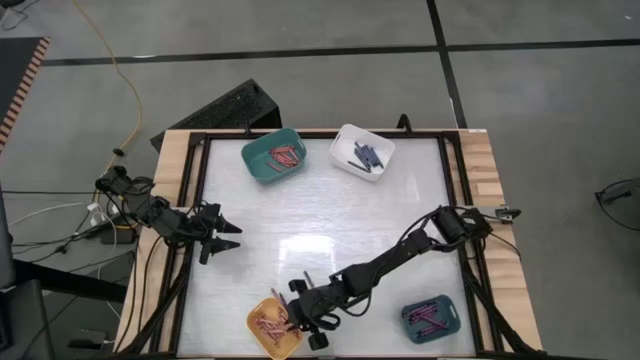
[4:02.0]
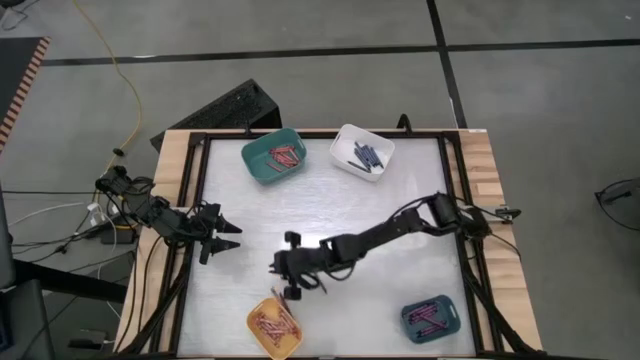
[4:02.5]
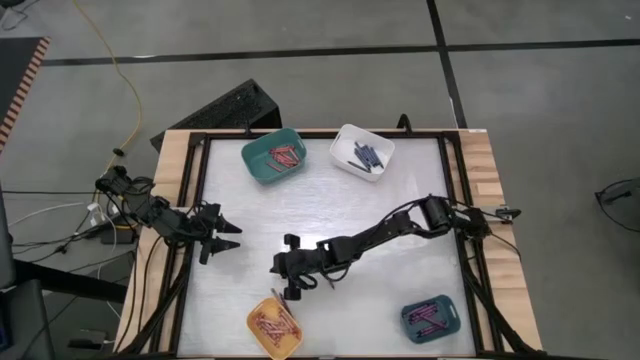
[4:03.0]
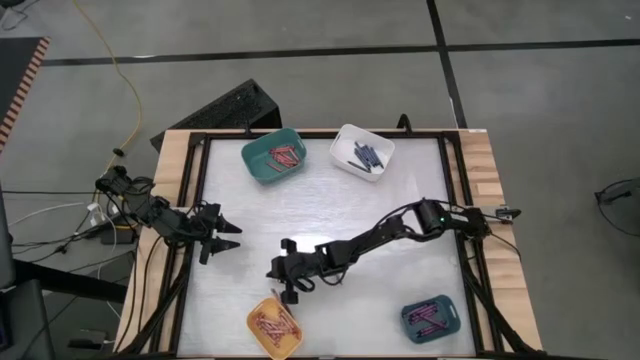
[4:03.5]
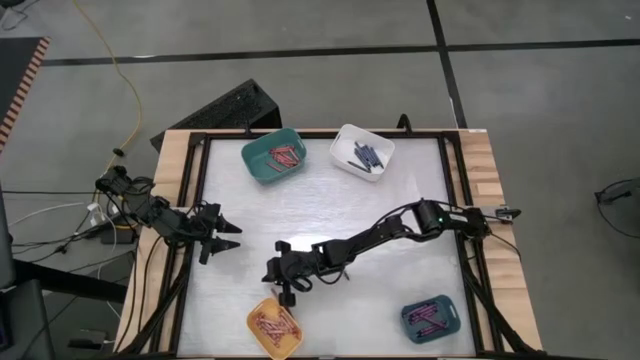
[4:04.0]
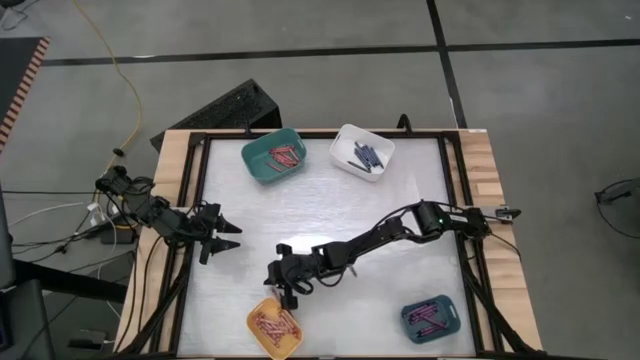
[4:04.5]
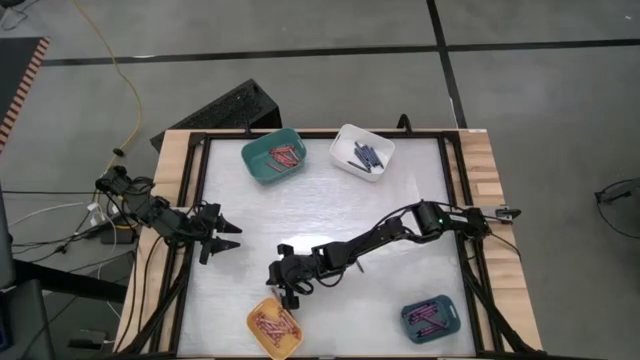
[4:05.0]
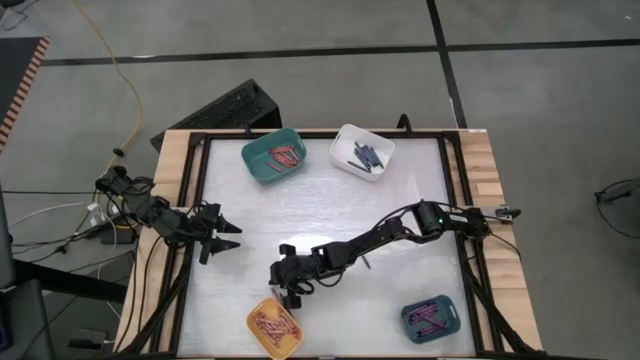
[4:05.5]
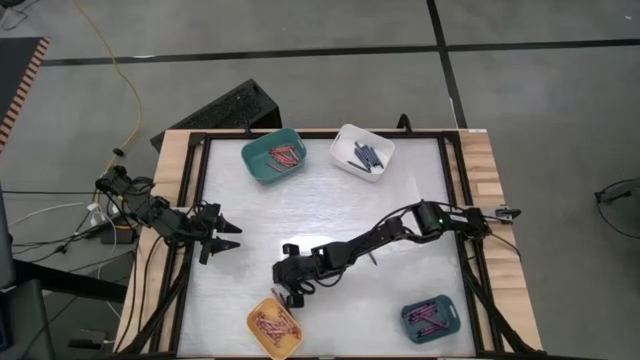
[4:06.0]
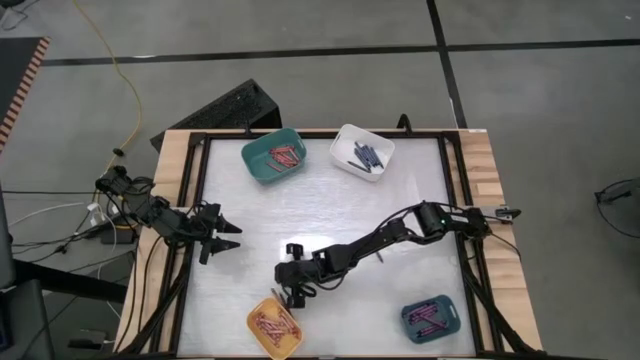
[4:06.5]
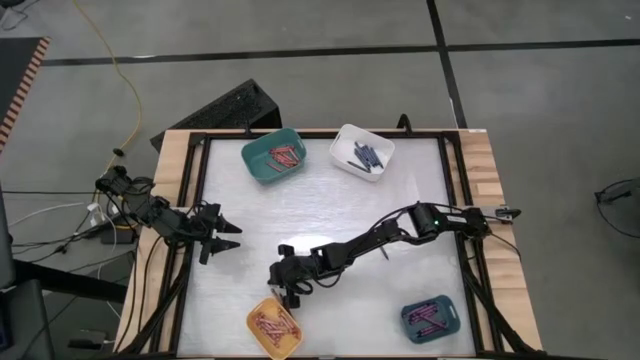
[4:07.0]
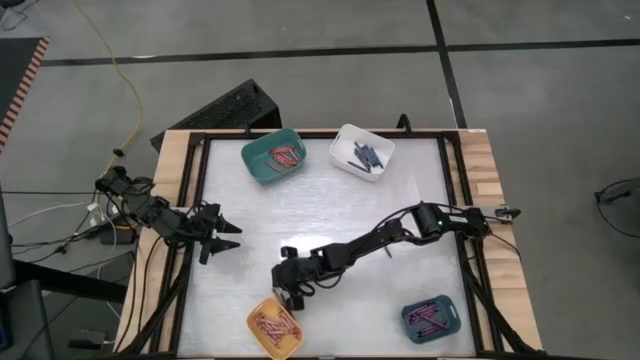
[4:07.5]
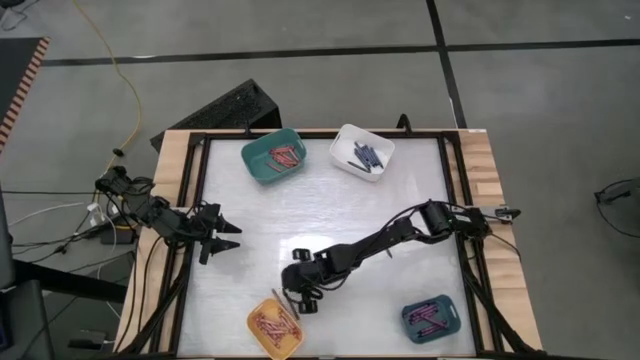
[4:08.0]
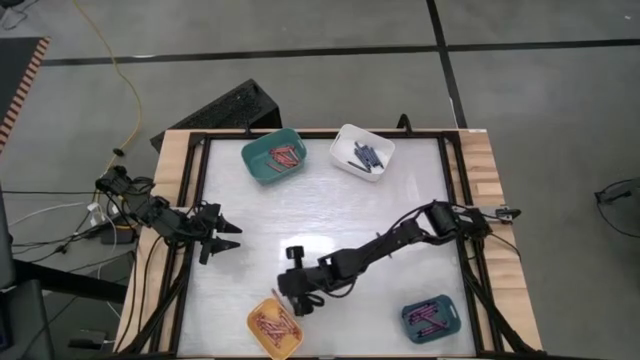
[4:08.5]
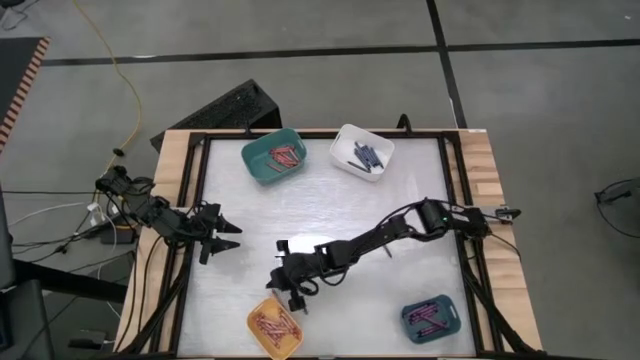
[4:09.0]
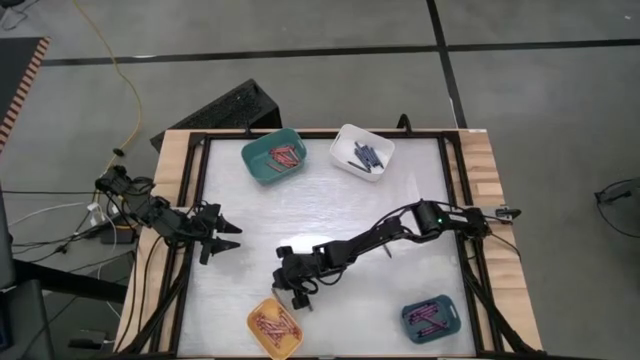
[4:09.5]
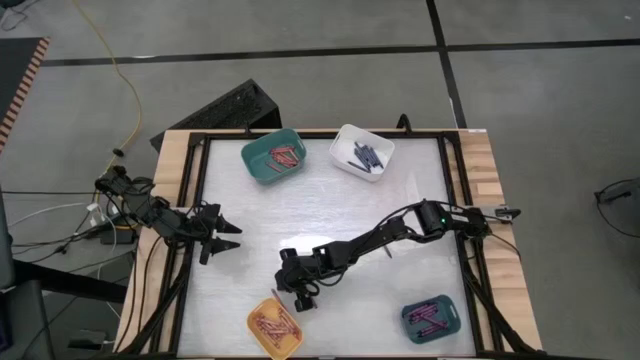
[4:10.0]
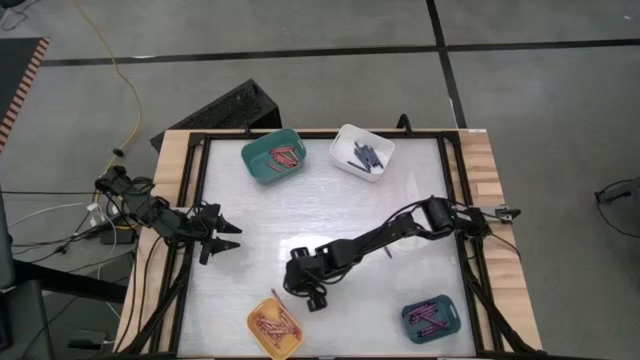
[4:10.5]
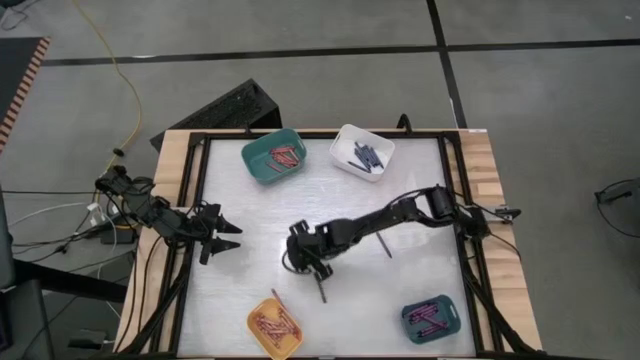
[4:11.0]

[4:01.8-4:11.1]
Task: Sort crayons
Adjust the crayons

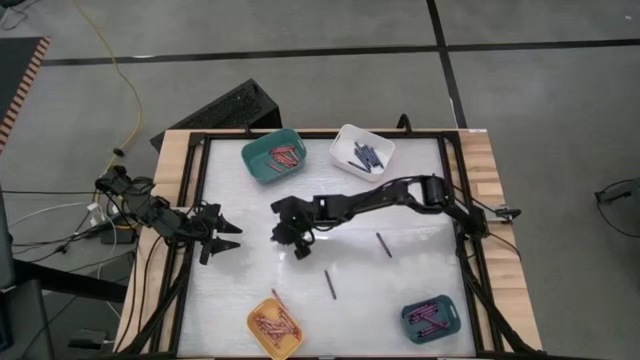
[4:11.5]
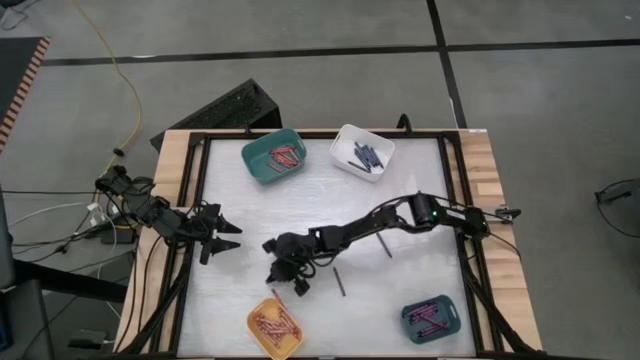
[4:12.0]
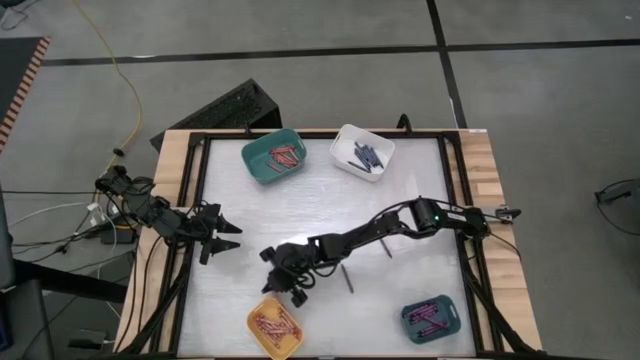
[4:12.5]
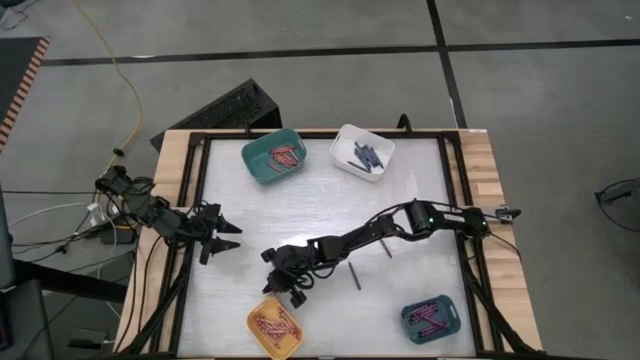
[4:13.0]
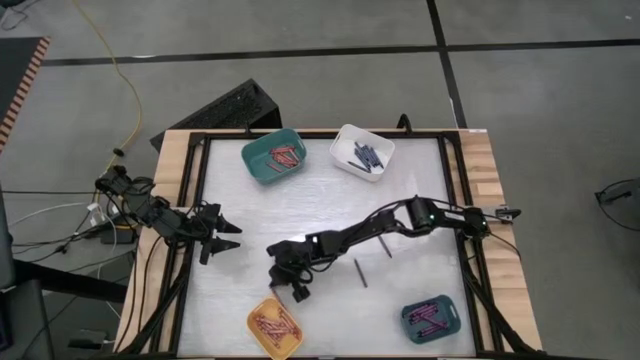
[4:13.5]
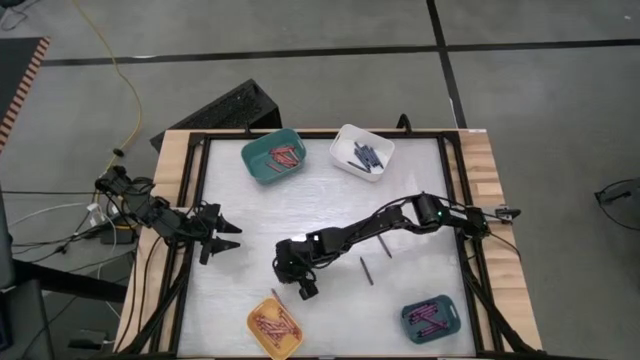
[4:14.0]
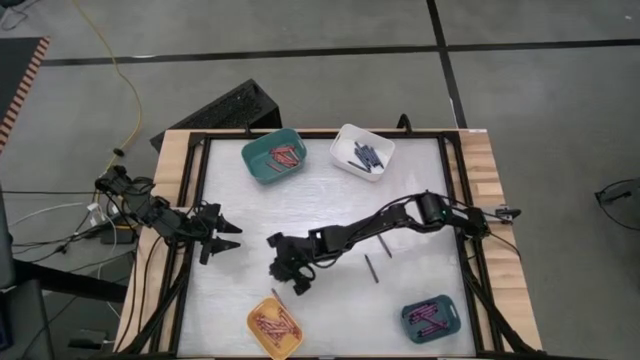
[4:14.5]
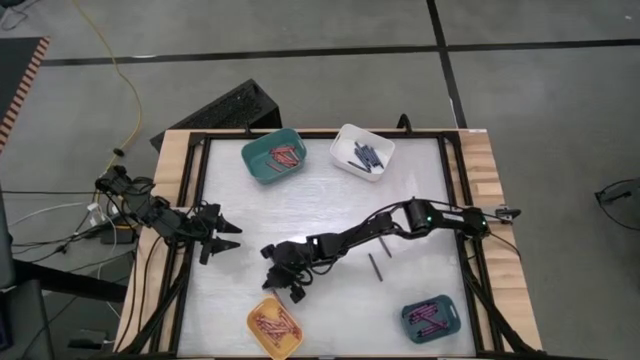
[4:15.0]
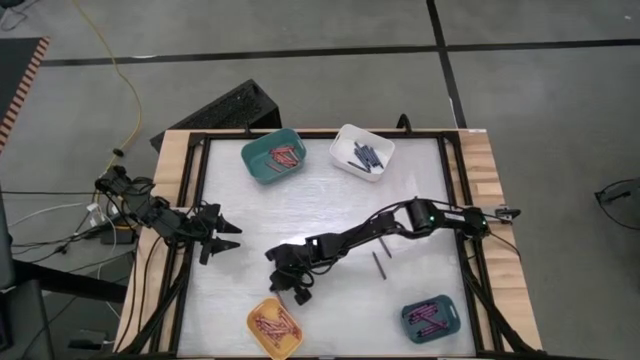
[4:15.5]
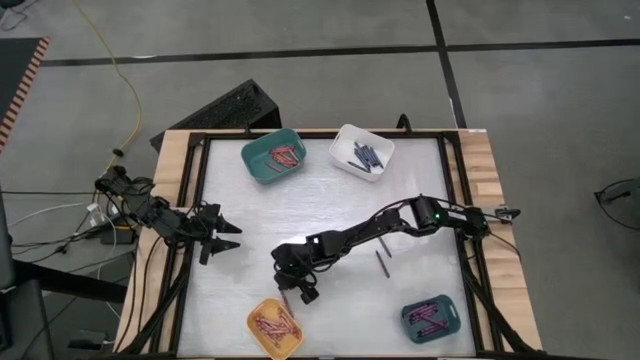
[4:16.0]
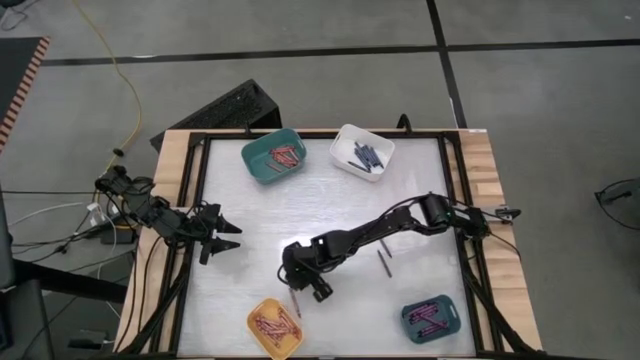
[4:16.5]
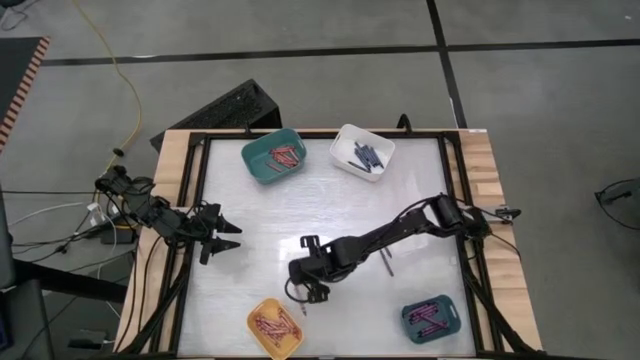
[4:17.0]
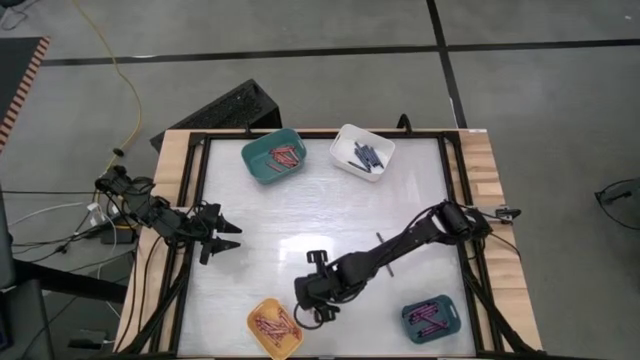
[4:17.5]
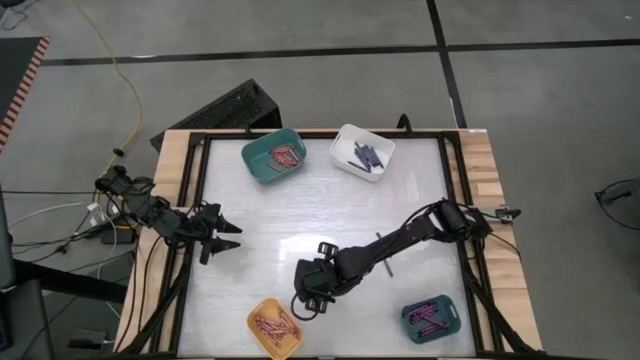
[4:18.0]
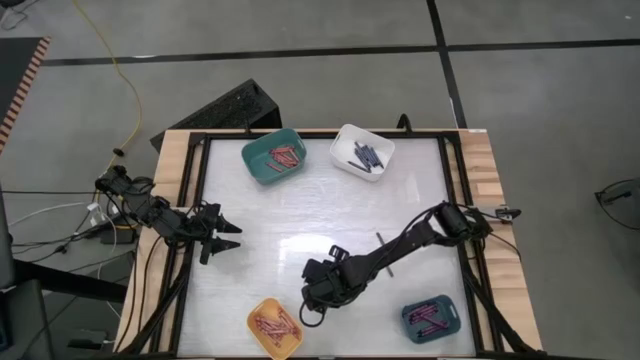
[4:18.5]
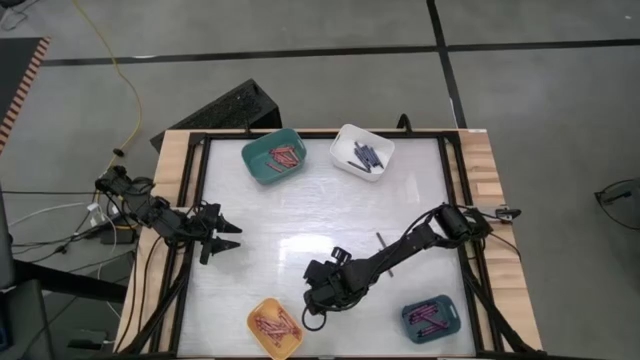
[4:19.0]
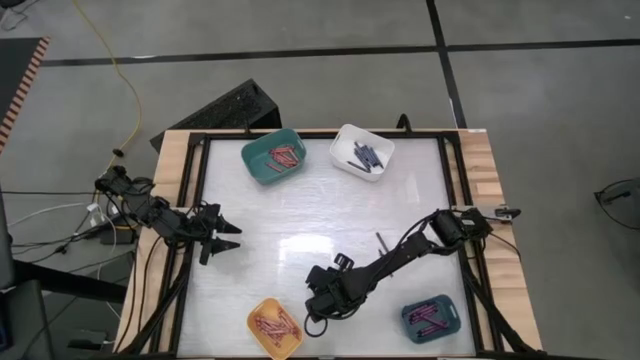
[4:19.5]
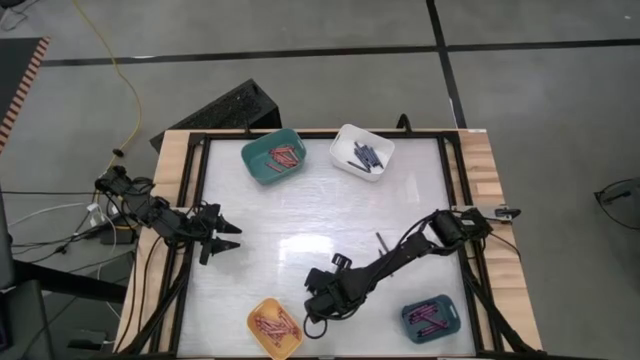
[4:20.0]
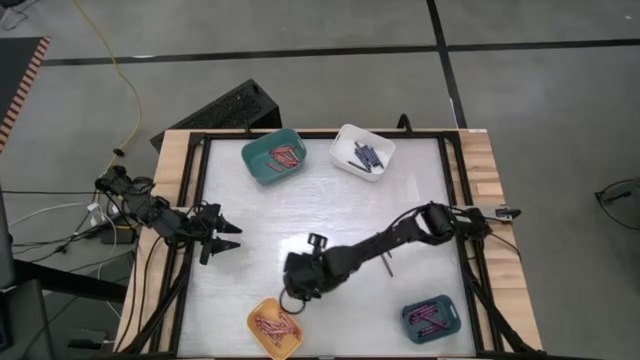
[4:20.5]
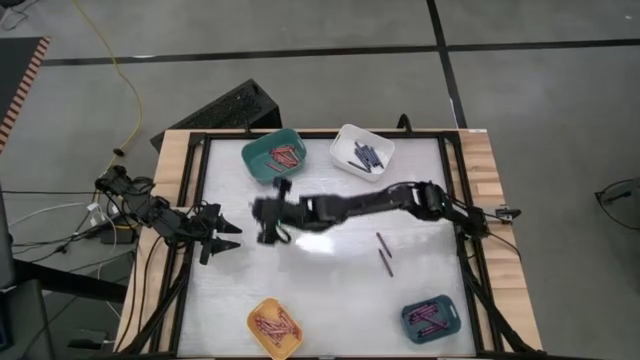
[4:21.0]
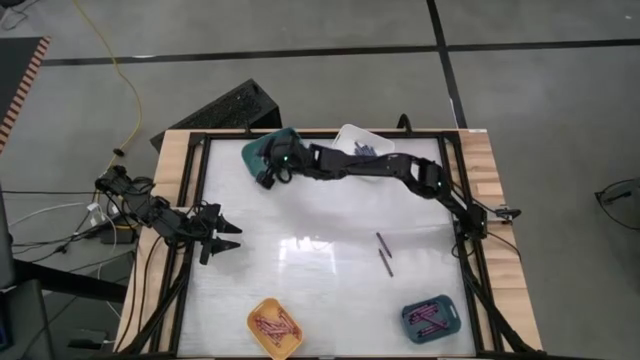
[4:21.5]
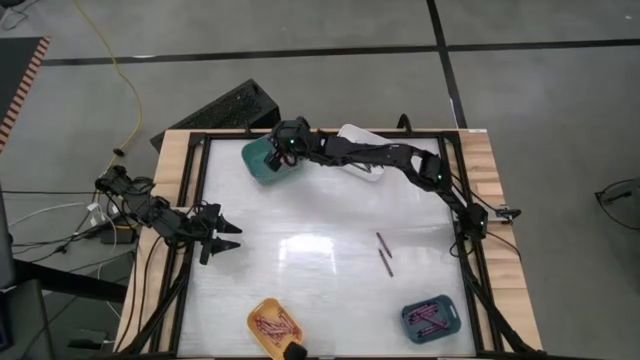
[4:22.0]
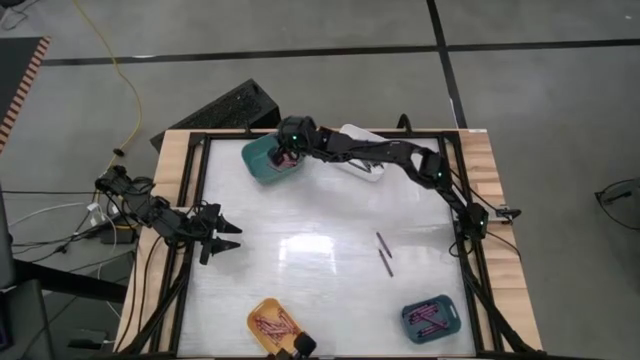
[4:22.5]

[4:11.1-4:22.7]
Put the red crayon into the top green bin

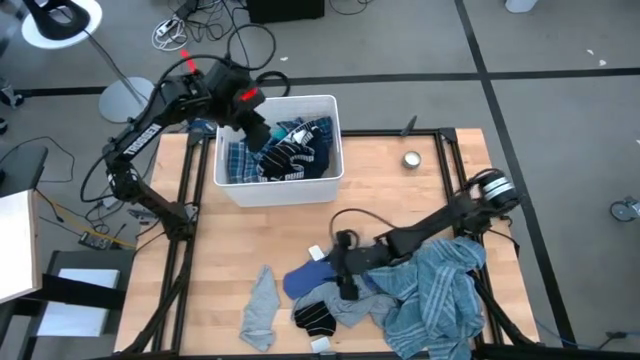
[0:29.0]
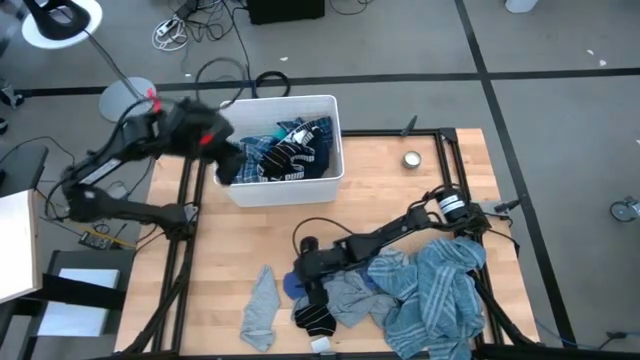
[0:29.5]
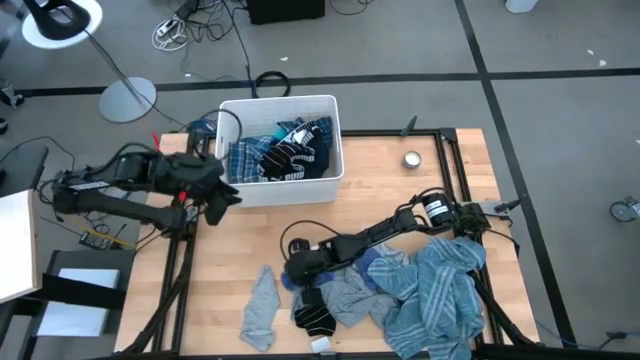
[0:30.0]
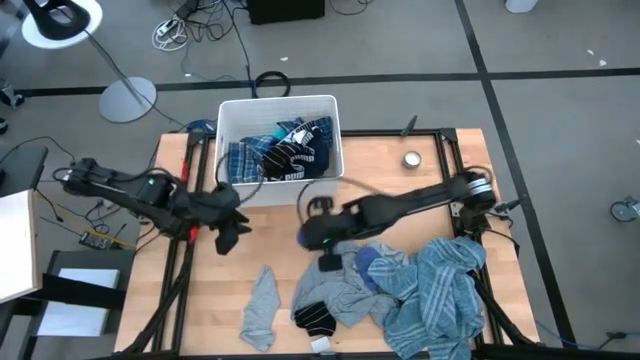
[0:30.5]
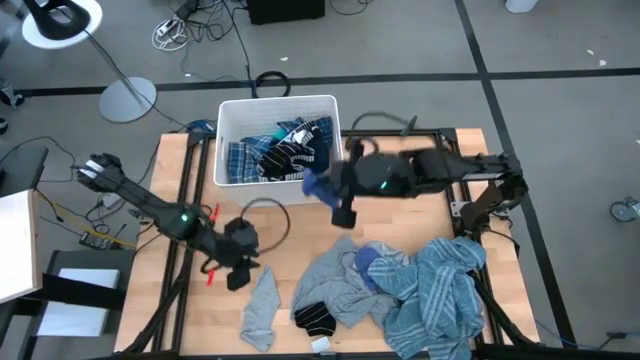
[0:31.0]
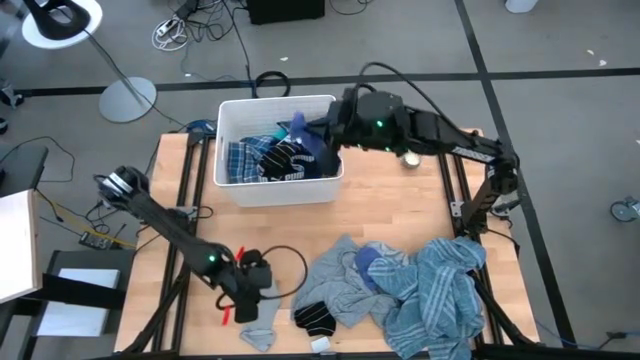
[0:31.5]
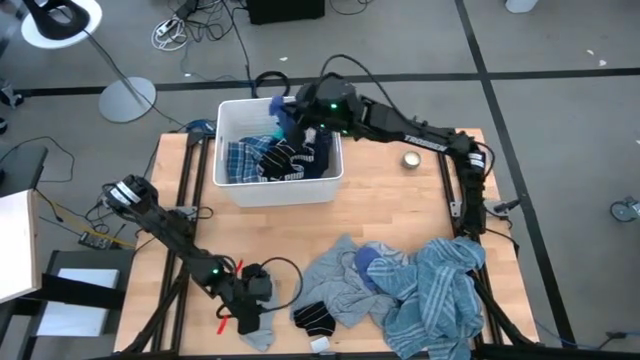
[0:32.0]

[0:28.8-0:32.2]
Task: Sort clothes
Put the left blue sock into the white laundry bin
